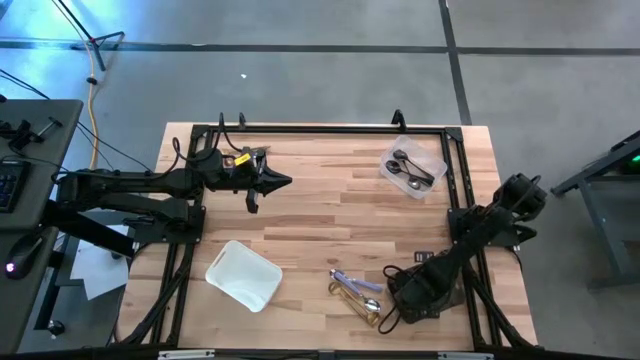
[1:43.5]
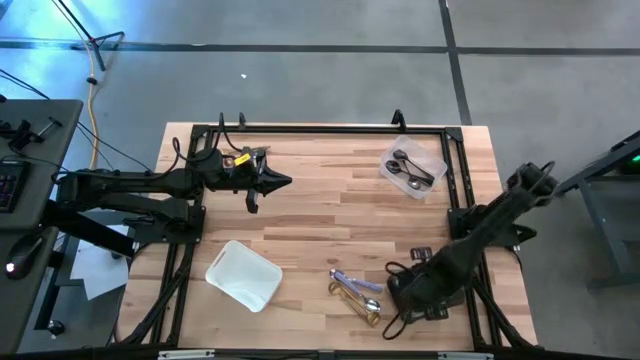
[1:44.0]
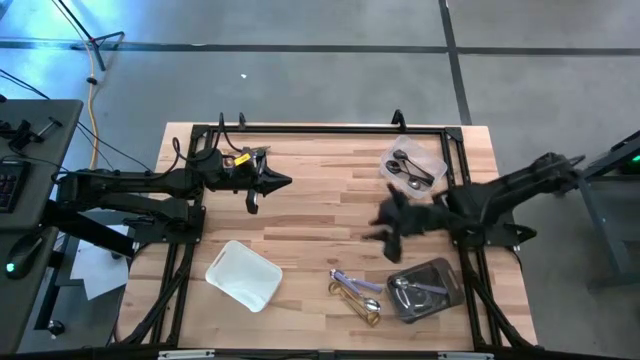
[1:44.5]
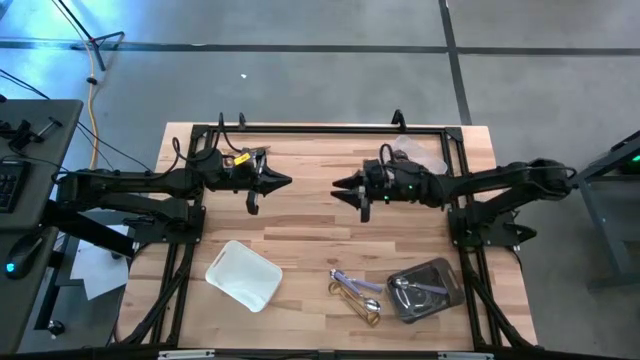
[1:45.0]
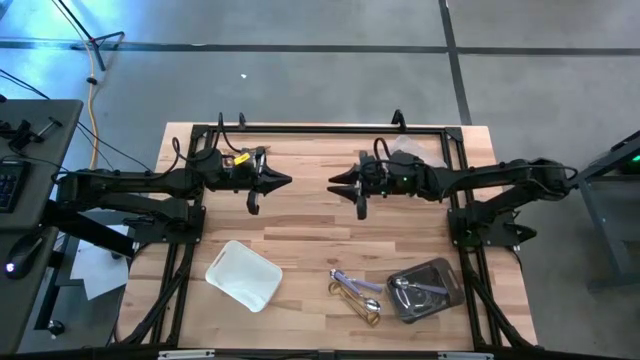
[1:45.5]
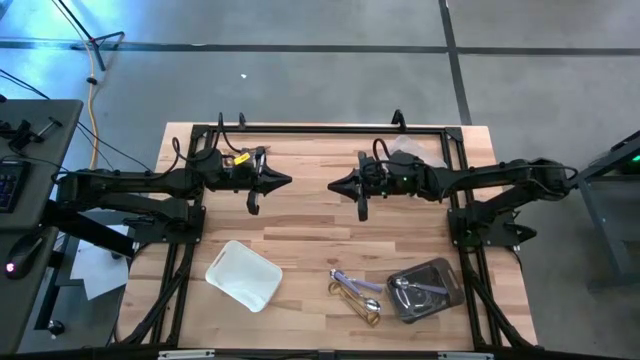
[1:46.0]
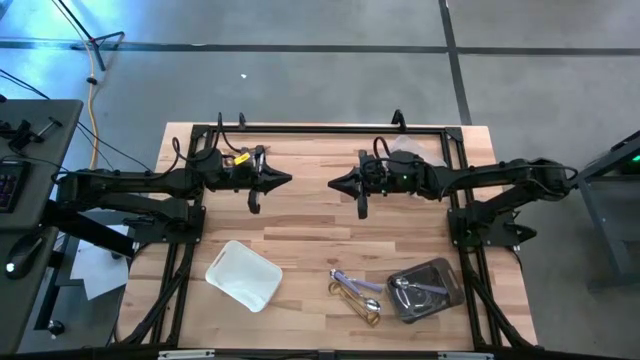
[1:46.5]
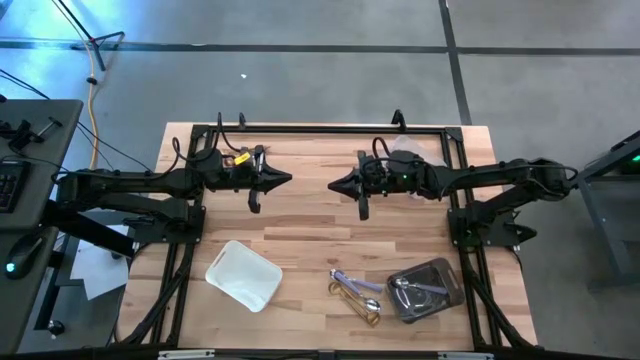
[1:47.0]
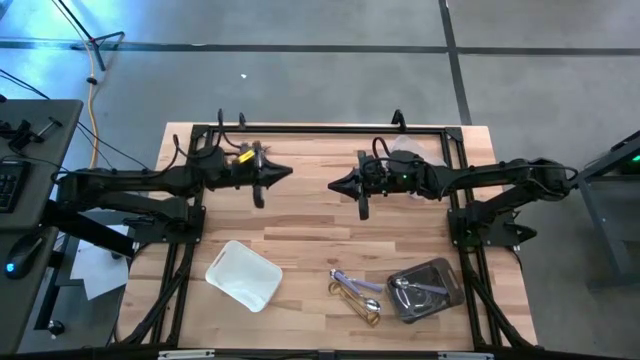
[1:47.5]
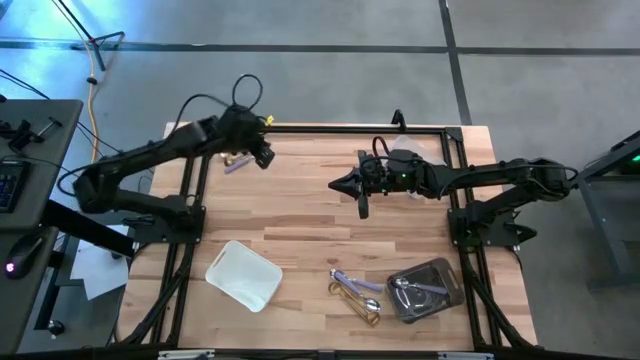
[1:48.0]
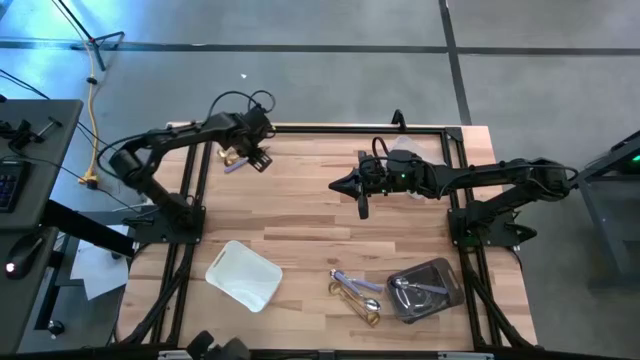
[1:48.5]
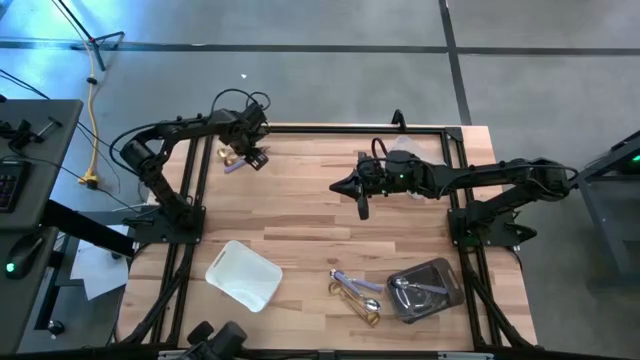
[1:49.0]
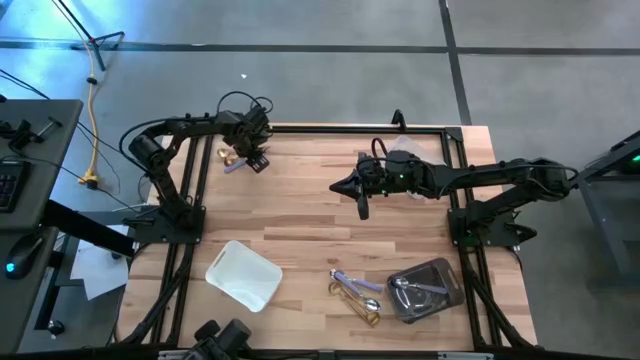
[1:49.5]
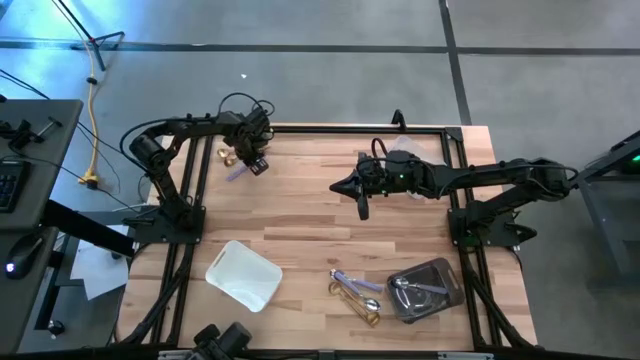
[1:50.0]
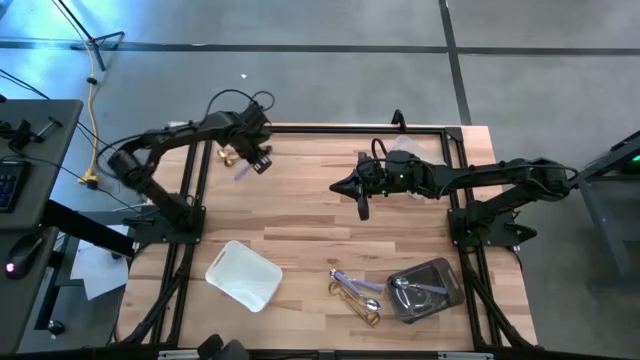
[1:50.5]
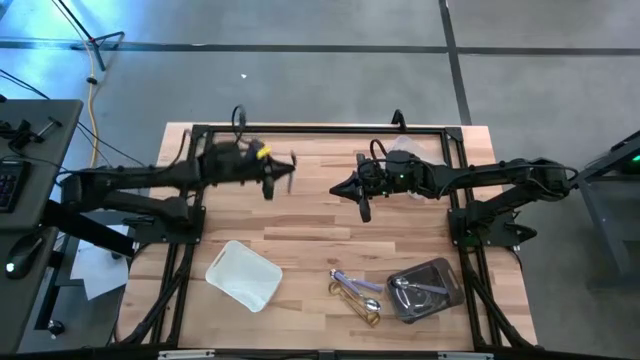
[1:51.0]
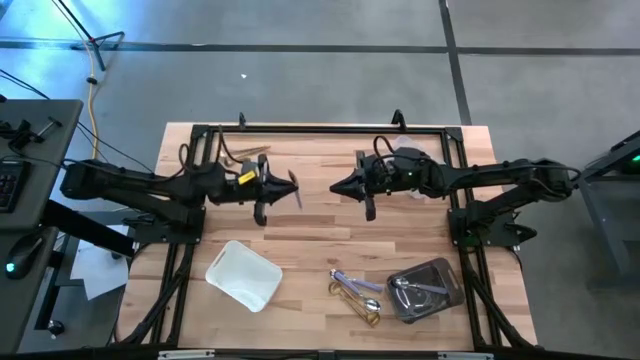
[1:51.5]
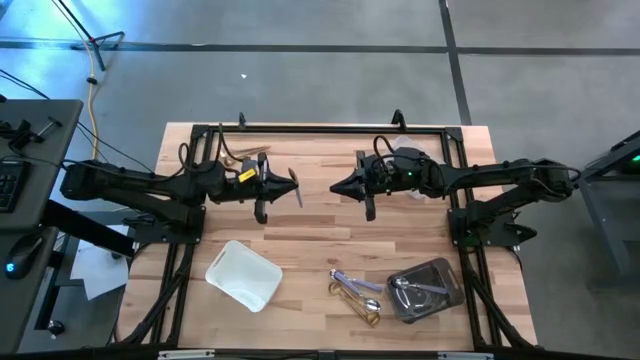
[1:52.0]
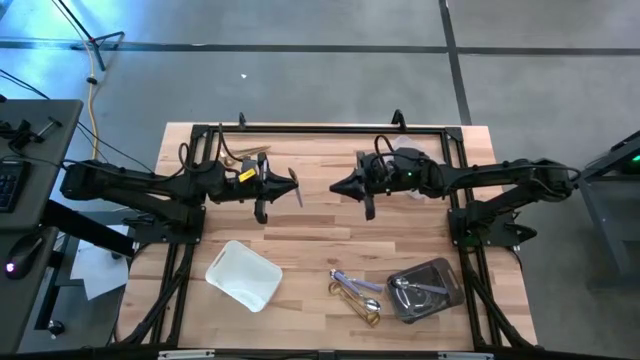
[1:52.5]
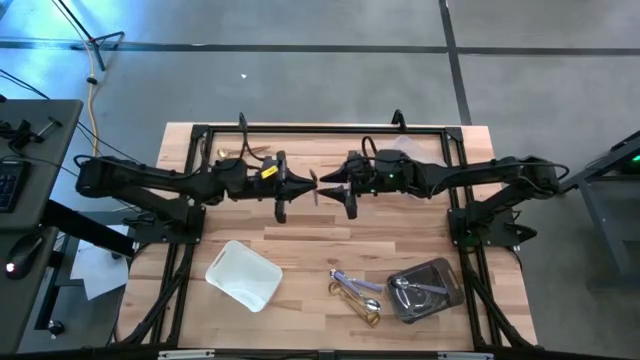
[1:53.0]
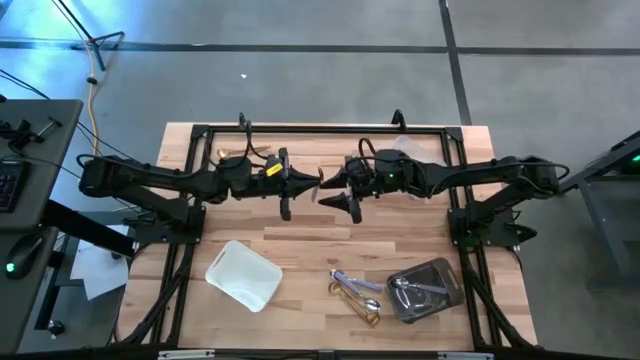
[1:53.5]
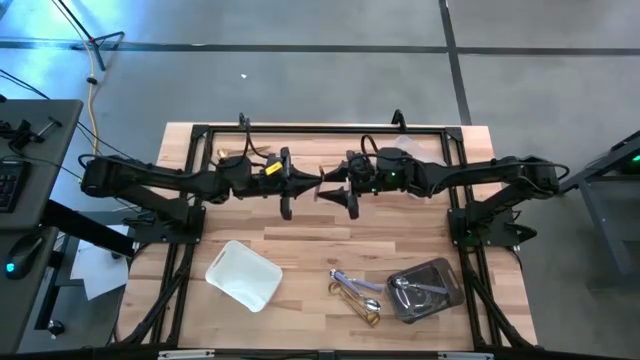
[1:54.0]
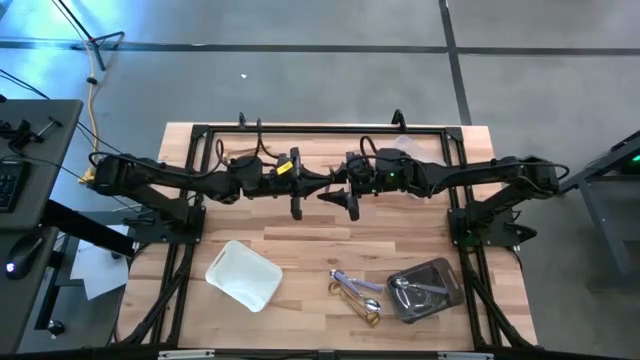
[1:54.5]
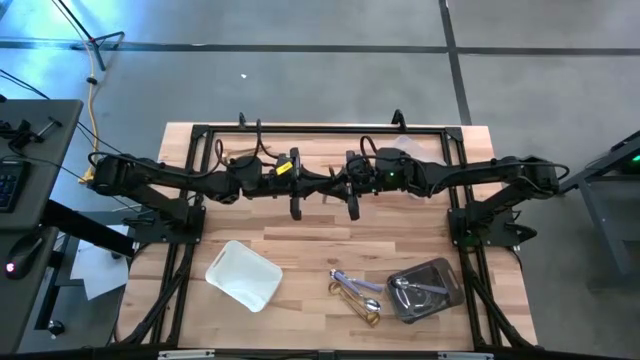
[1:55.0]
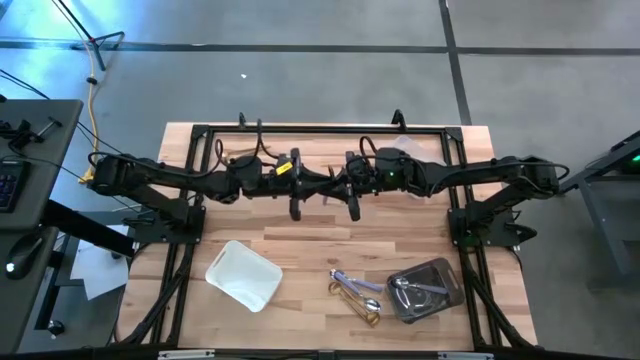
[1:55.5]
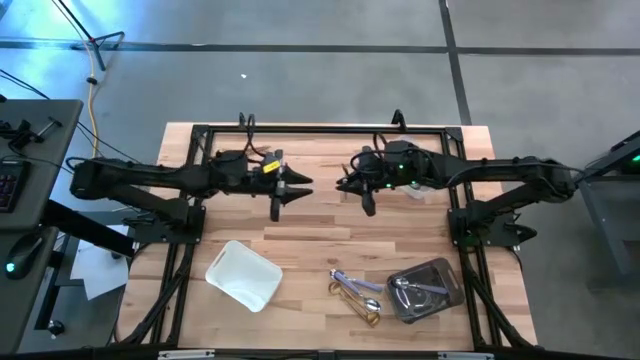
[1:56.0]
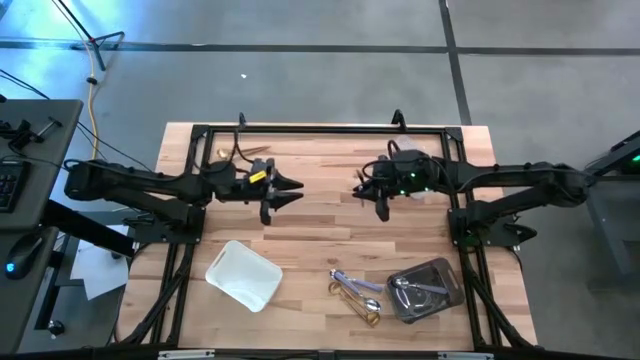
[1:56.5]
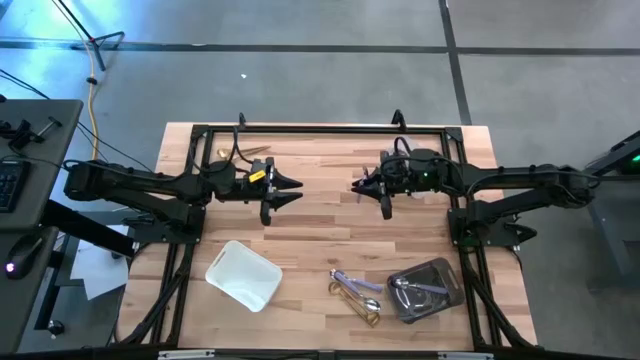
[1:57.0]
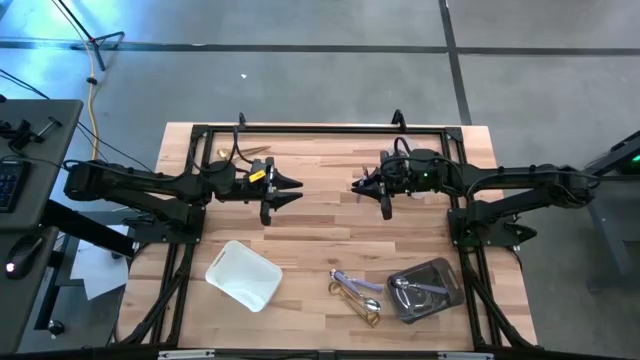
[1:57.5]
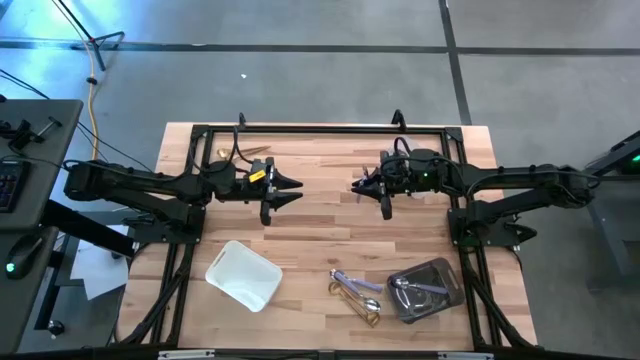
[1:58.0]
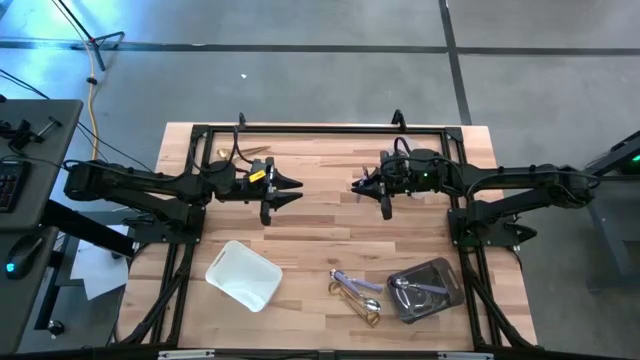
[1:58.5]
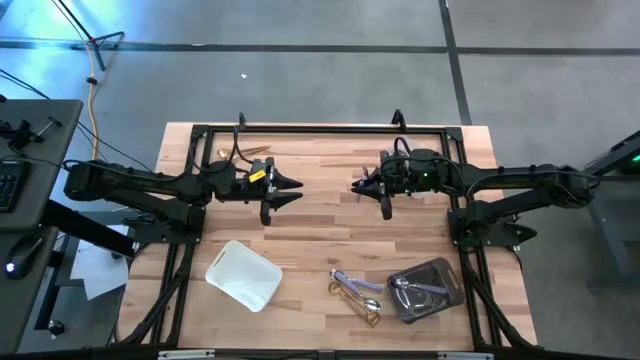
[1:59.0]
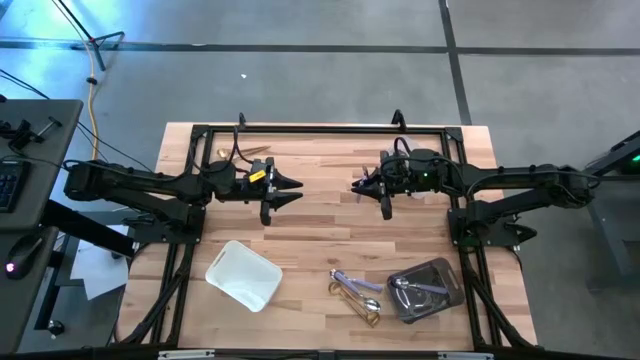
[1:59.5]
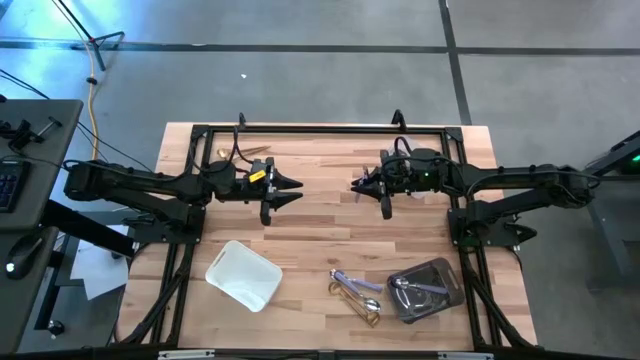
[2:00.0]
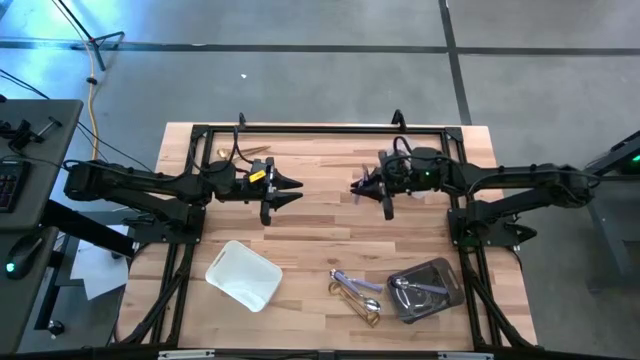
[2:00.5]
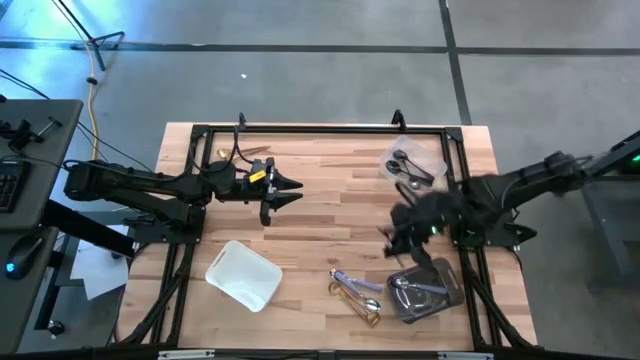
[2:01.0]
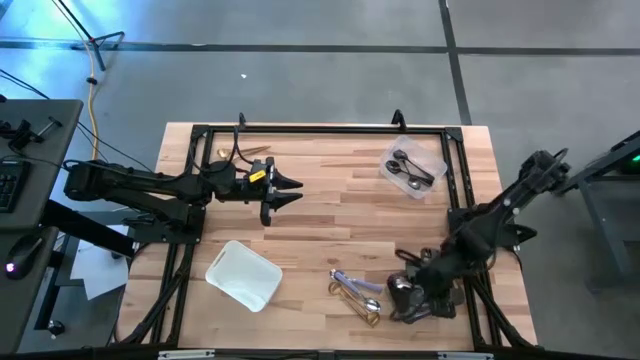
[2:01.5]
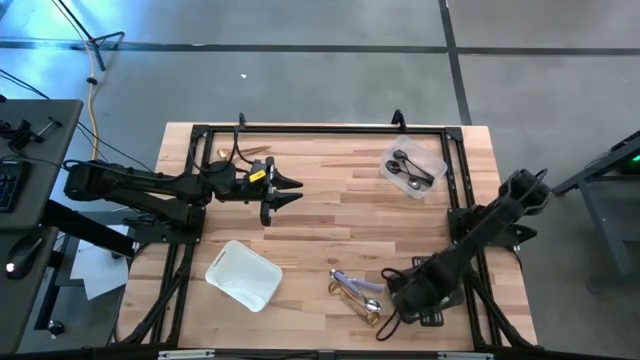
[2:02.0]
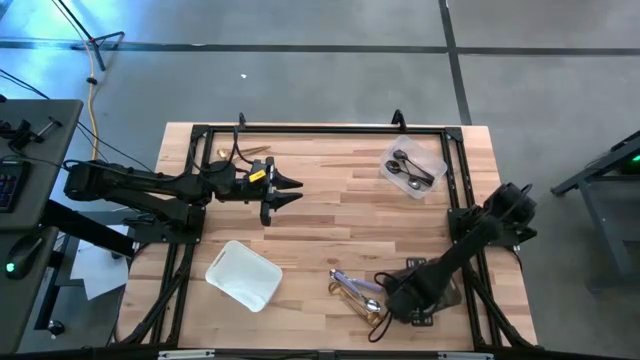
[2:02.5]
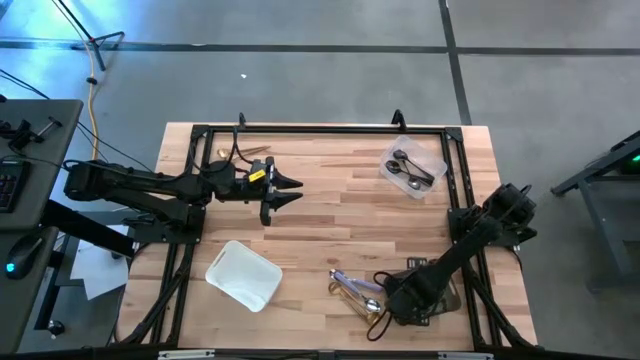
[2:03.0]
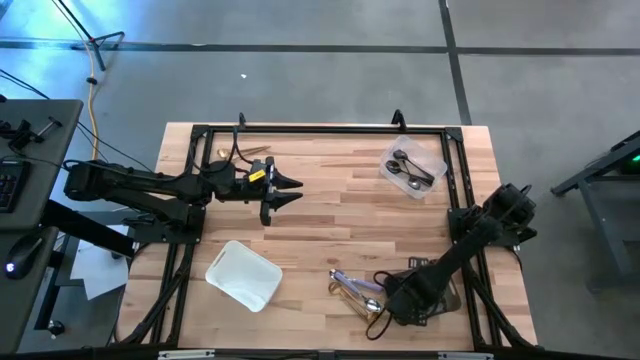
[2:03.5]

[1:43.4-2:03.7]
Task: Sort silverware by color (type)
Put the violet spoon into the black bin

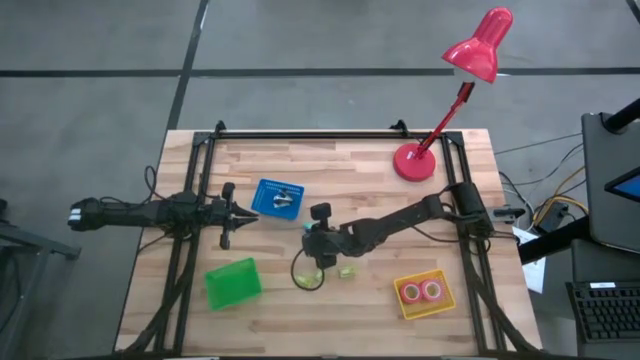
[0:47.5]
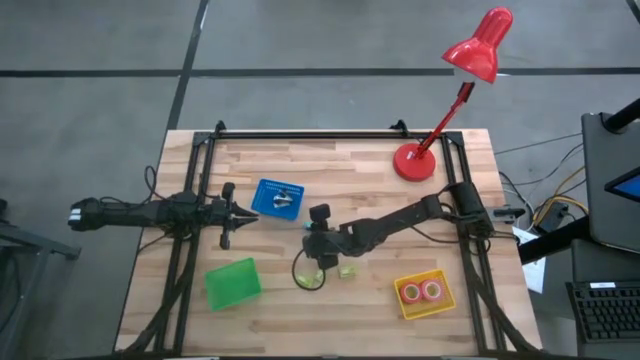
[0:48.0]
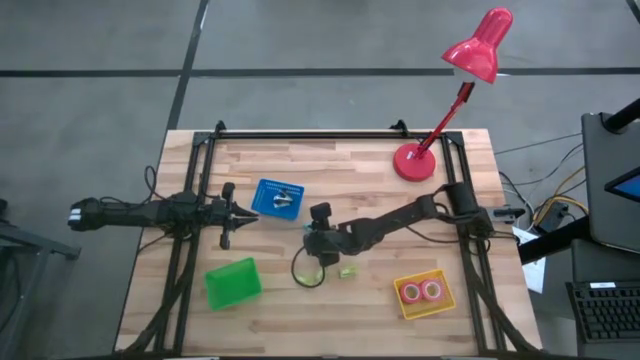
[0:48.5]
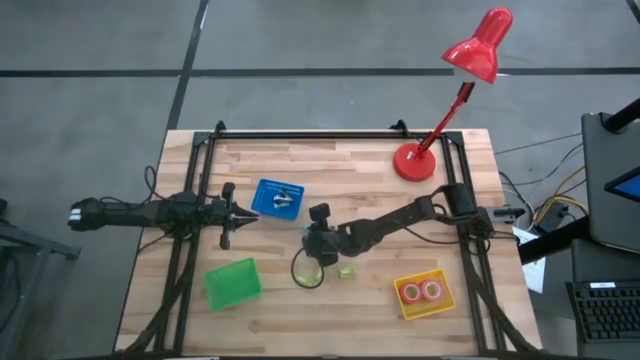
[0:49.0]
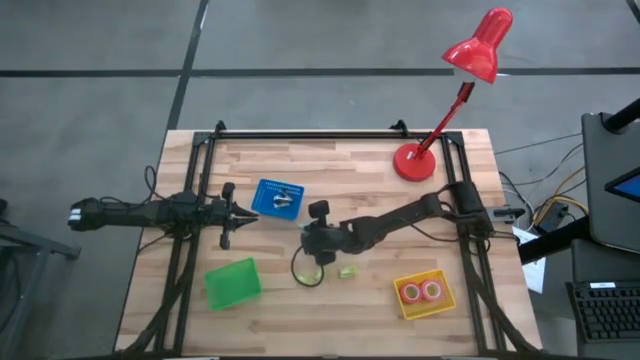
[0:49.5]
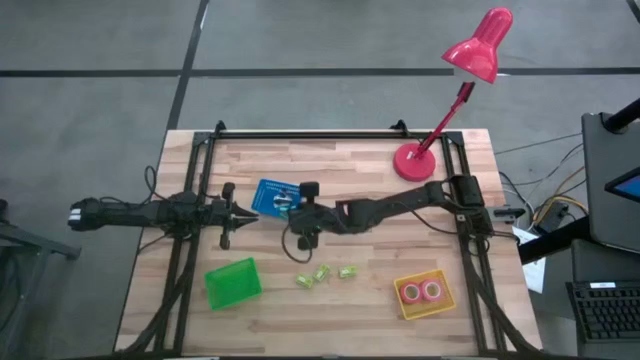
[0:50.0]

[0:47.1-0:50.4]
Task: Pick and place Stapler, Stapler remover, tape
Put the light blue staple remover into the blue bin
